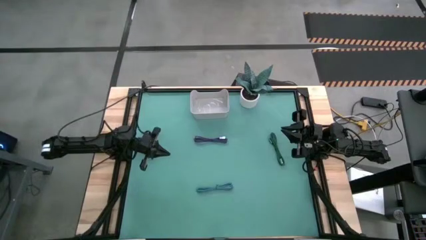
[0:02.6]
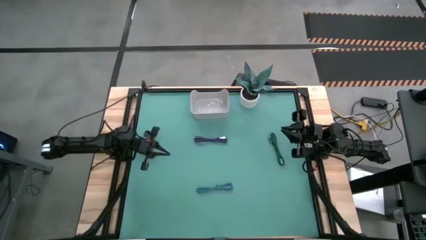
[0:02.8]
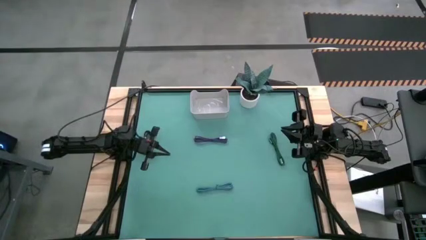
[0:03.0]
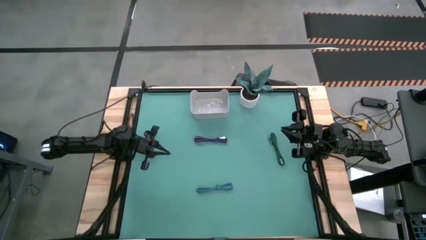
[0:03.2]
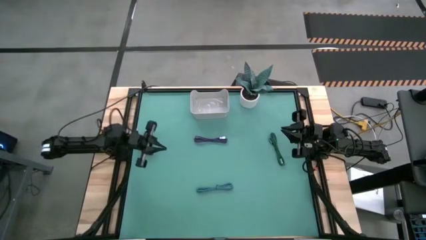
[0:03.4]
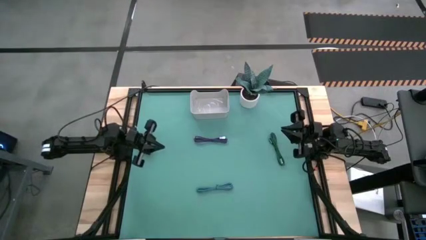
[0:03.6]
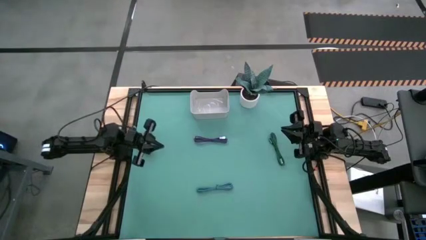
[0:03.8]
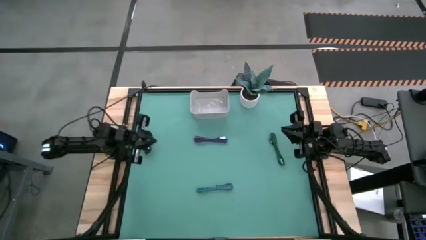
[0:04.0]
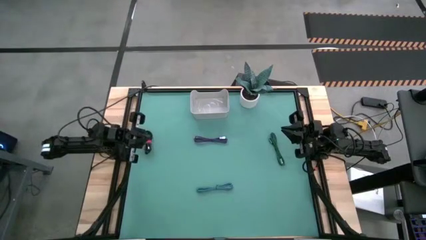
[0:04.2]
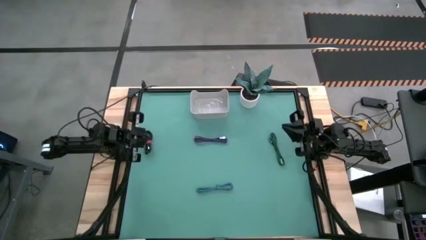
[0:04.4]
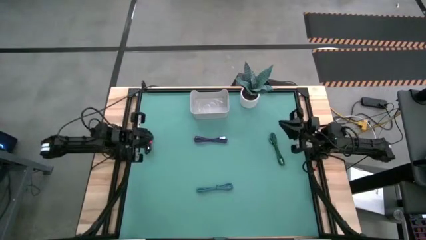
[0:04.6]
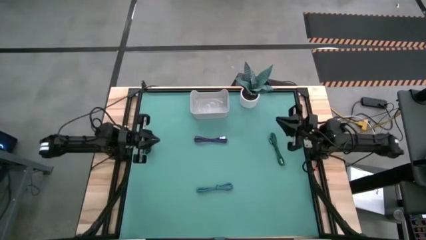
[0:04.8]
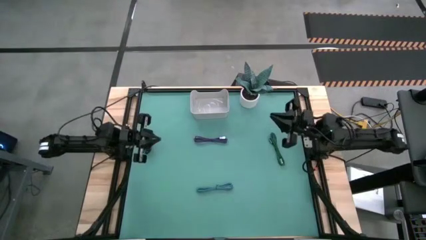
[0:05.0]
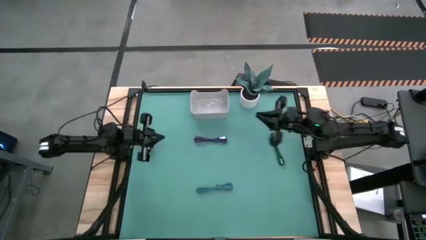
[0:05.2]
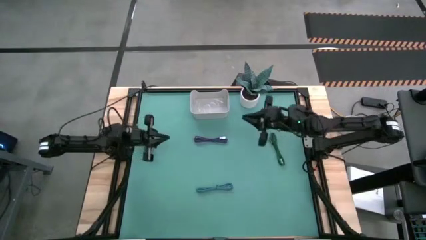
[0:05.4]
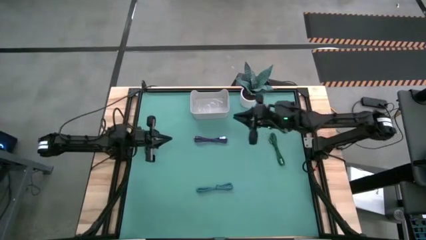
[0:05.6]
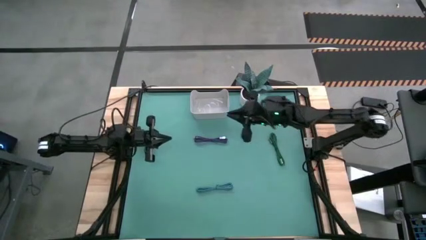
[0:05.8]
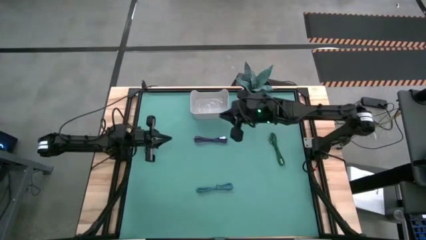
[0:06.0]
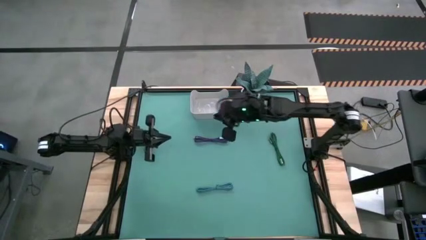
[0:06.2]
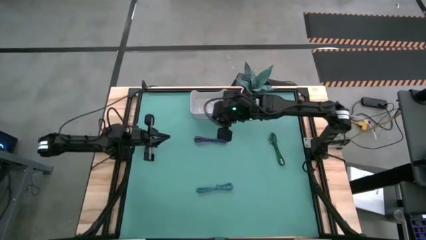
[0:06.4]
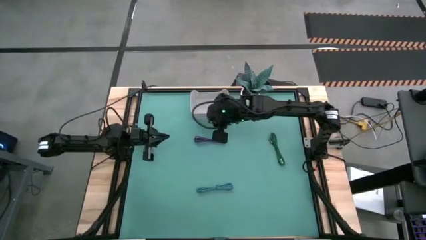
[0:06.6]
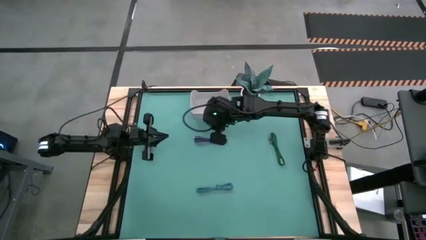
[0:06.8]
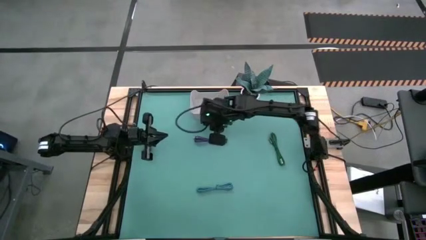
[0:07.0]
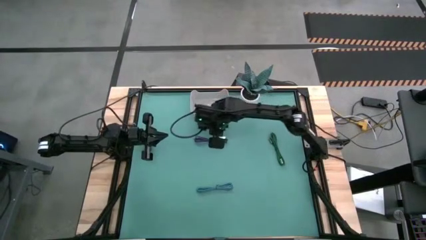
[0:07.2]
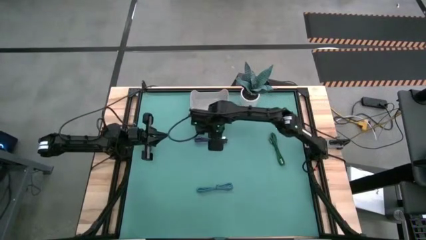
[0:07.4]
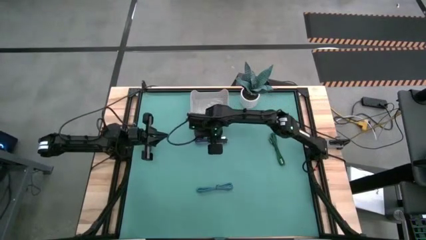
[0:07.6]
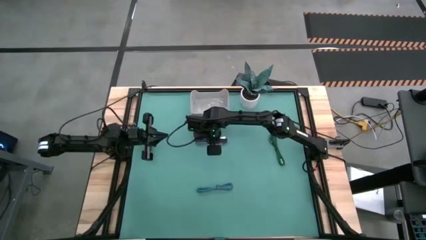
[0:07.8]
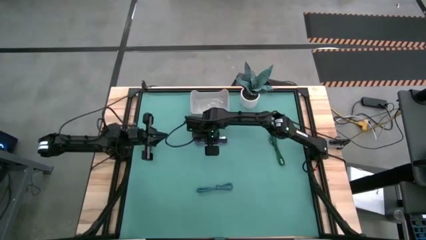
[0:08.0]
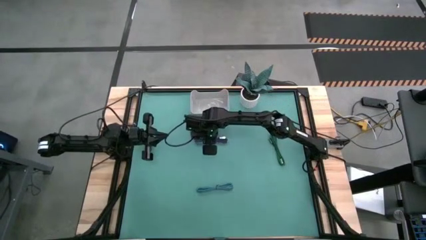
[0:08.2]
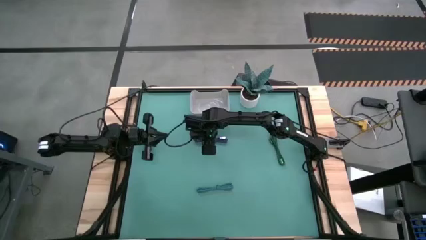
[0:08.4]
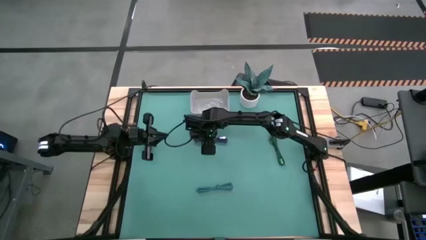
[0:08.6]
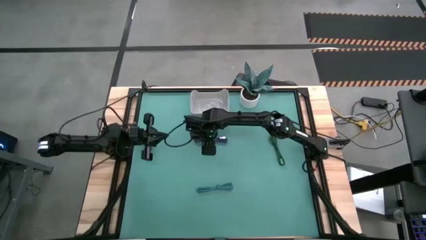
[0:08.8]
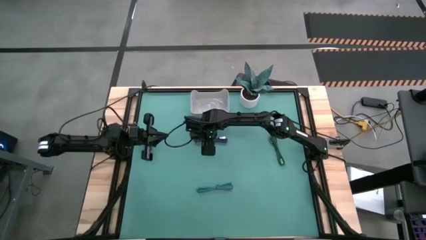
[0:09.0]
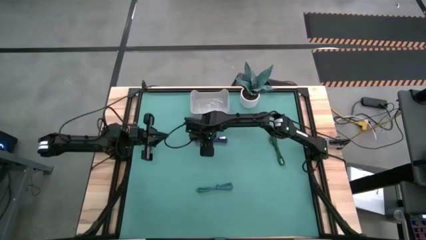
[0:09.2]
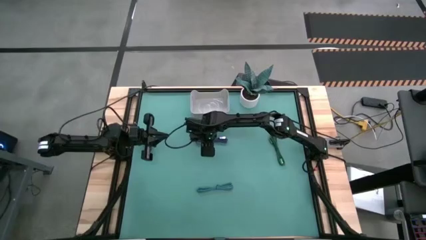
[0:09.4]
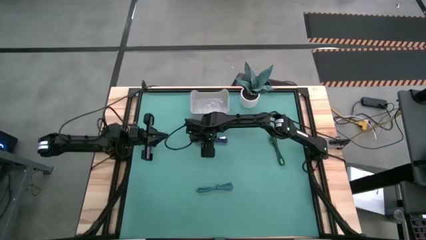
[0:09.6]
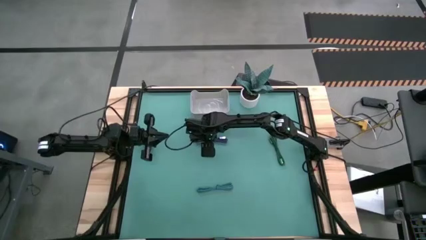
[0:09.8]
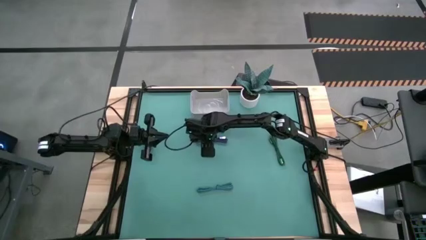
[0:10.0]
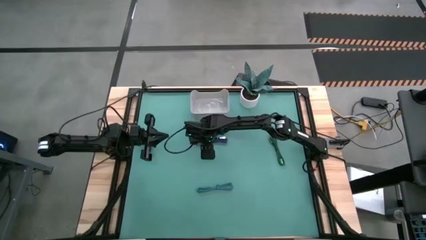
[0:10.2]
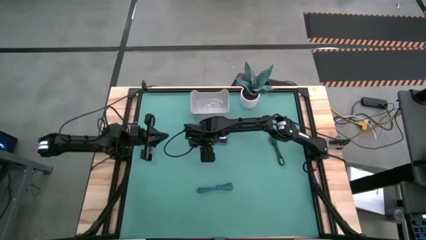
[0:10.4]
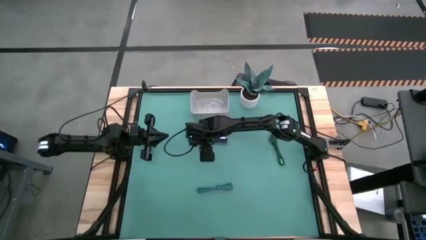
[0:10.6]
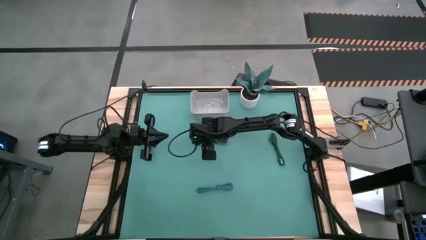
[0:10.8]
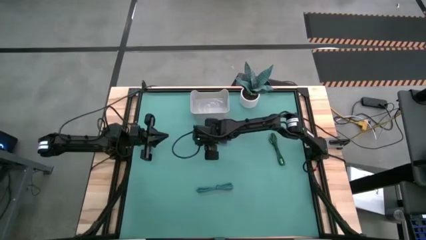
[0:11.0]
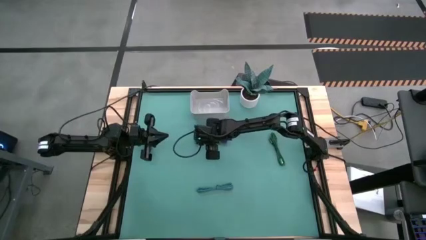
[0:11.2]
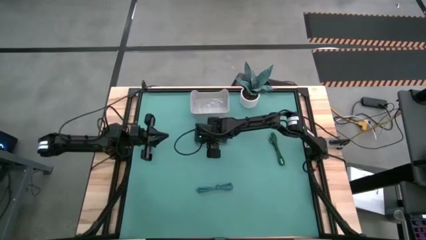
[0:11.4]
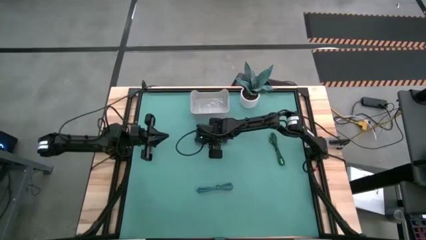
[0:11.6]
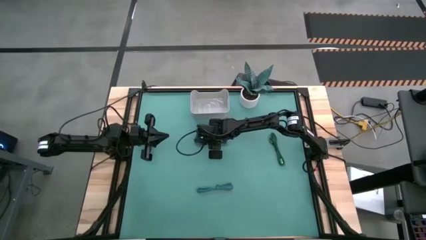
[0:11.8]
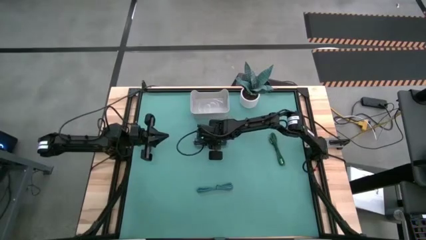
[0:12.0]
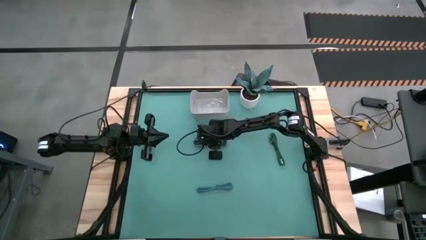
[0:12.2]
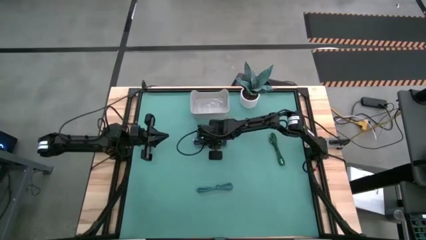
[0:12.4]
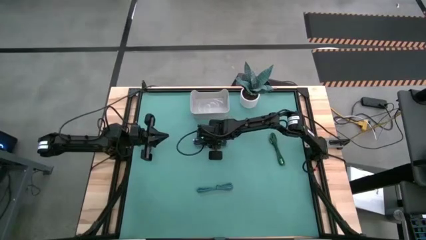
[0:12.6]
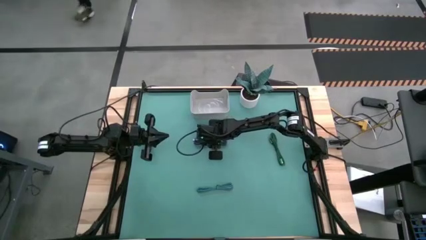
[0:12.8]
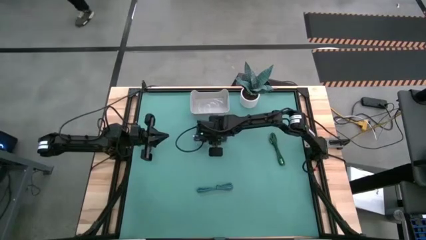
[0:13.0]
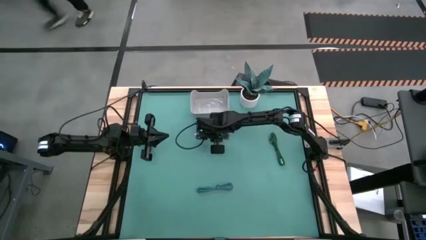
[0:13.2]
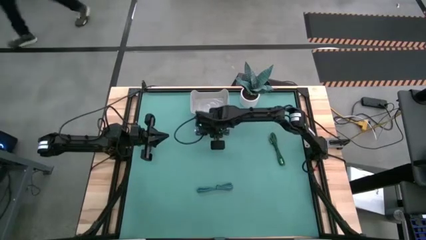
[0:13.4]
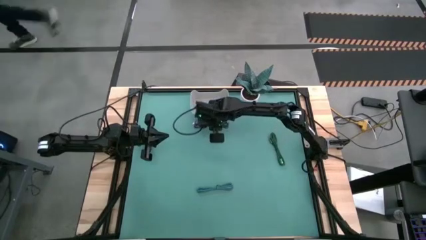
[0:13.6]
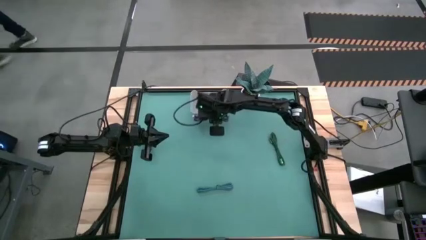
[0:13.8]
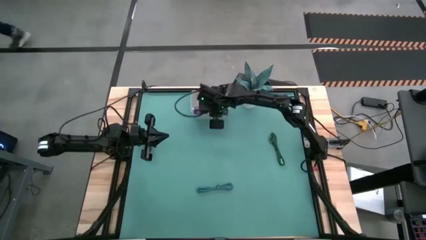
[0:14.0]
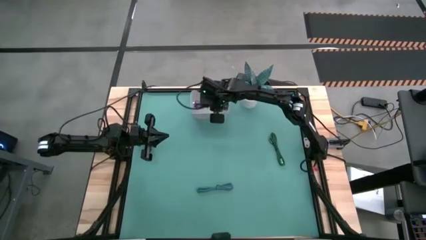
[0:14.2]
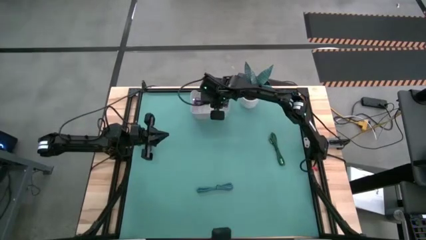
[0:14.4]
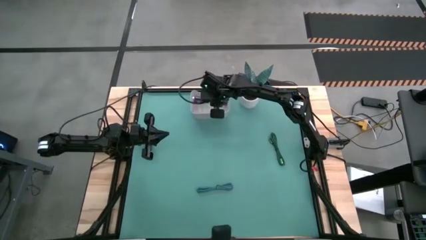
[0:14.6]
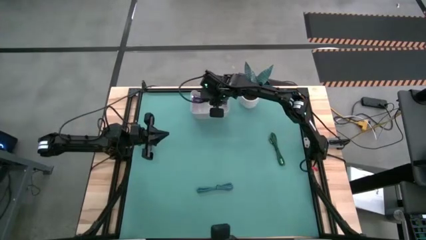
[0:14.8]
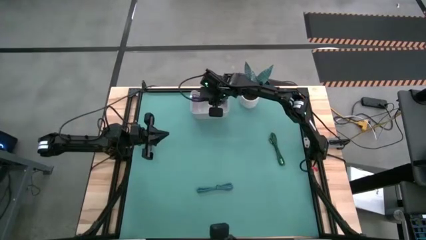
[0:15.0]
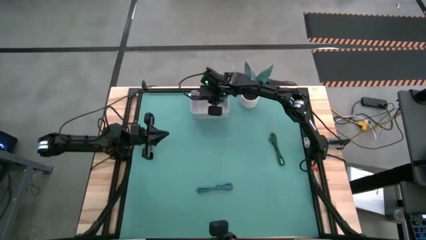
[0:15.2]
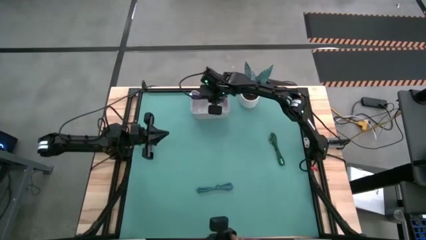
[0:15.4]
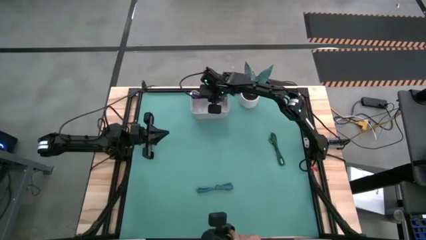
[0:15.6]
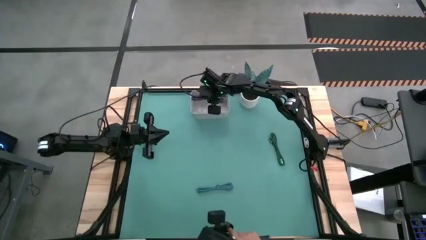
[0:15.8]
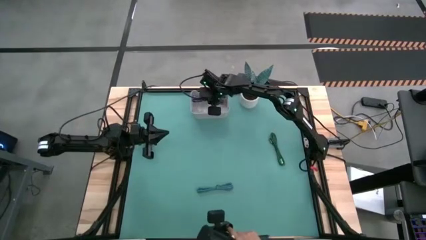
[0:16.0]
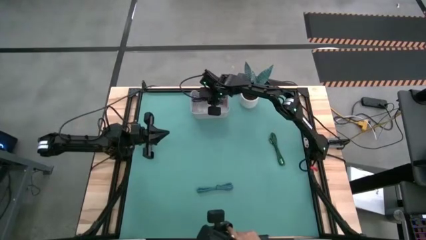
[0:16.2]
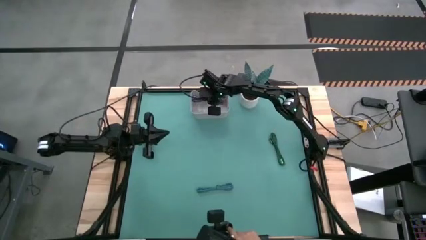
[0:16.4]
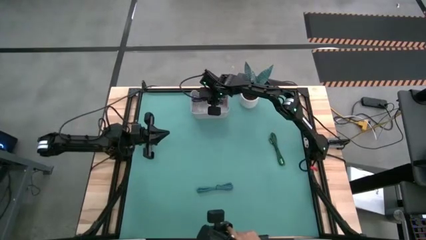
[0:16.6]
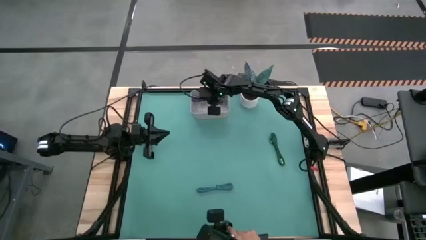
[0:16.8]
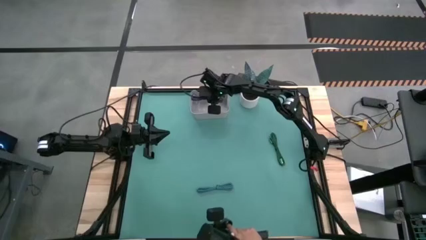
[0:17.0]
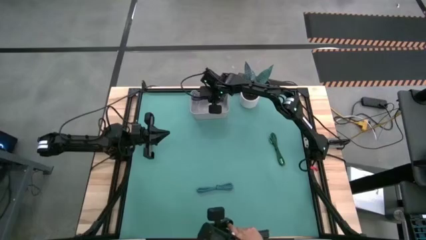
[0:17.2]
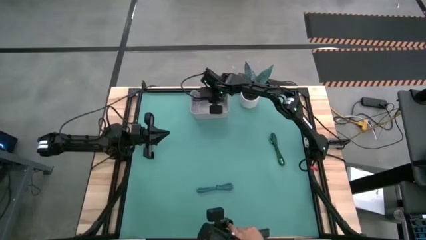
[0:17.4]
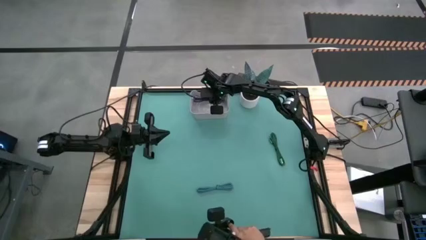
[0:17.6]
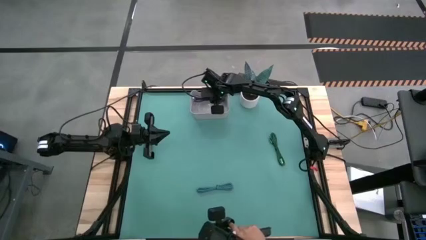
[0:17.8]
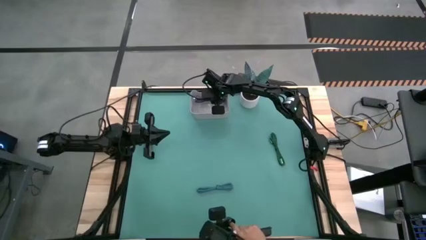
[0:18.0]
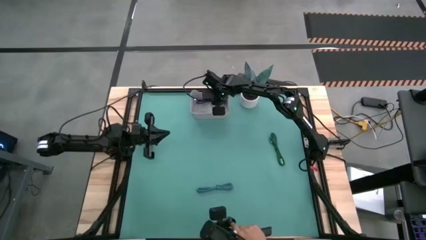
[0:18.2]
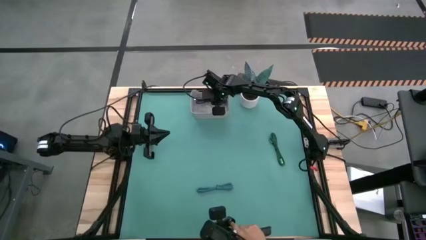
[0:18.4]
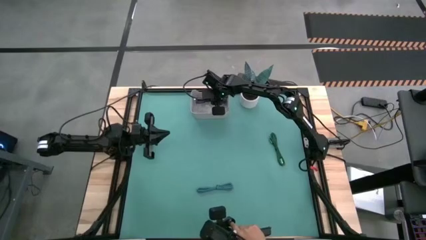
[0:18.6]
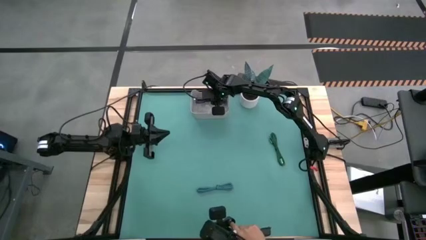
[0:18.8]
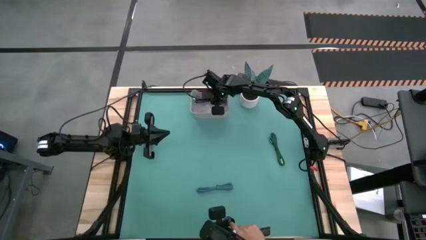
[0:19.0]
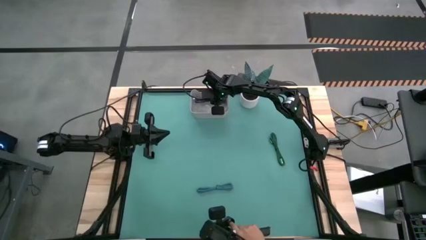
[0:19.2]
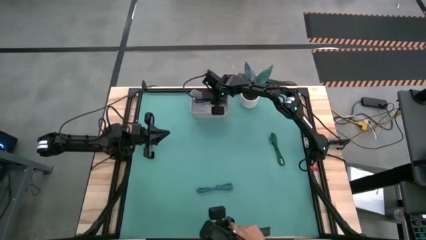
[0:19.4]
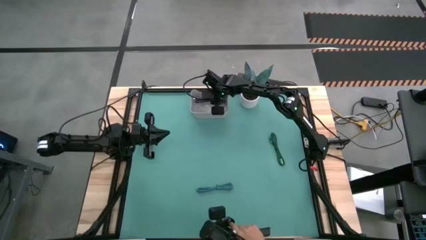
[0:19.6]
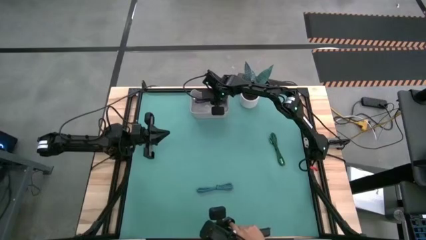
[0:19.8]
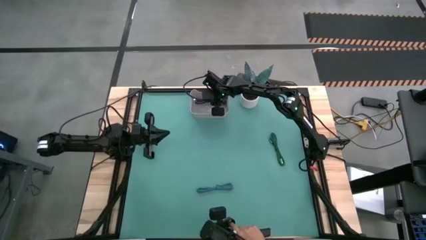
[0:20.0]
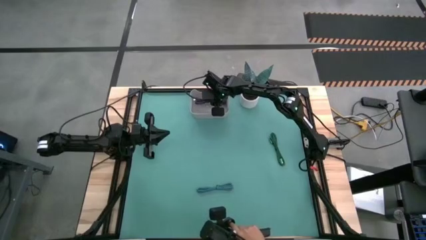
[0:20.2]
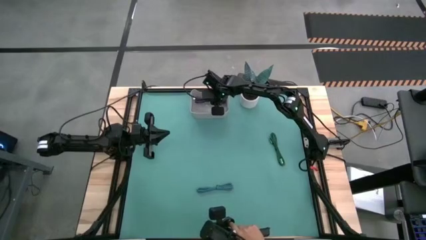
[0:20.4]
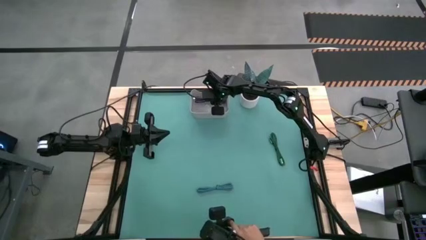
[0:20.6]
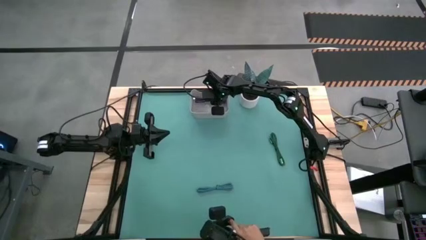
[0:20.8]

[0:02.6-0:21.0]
Task: Pick and place USB-C Cables
Put the purple charger cable into the white bin
